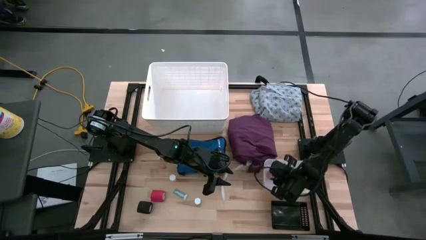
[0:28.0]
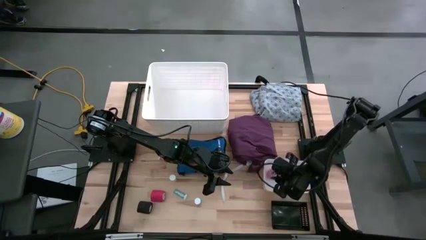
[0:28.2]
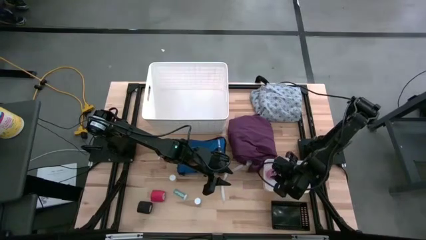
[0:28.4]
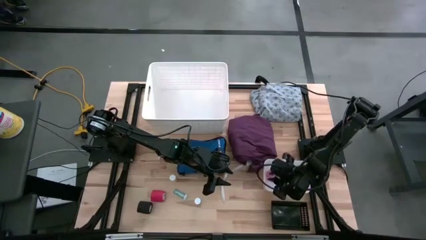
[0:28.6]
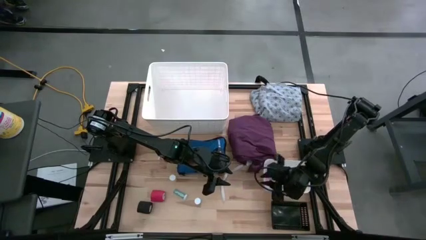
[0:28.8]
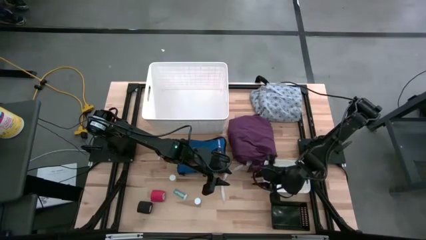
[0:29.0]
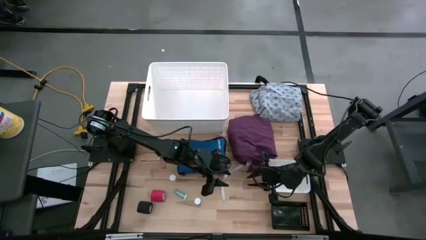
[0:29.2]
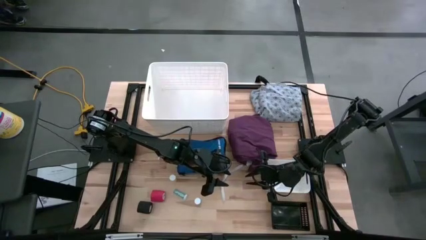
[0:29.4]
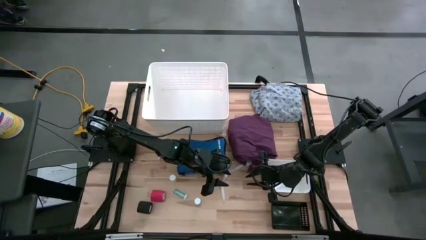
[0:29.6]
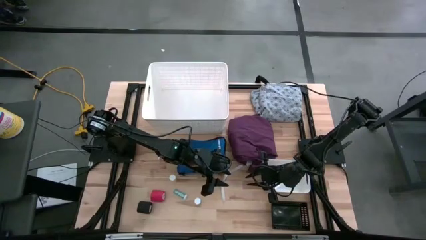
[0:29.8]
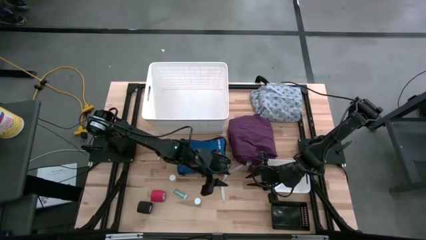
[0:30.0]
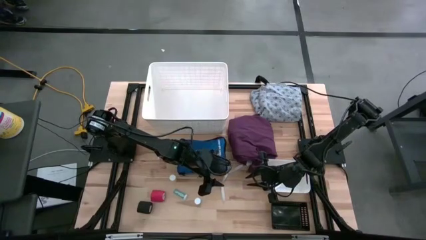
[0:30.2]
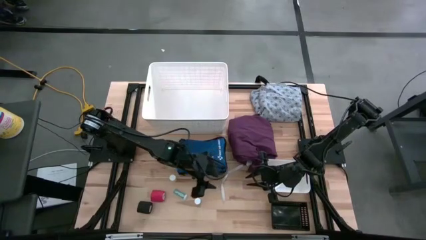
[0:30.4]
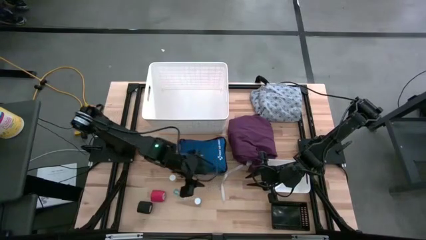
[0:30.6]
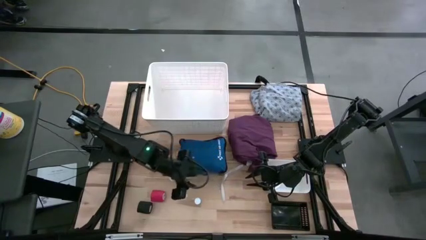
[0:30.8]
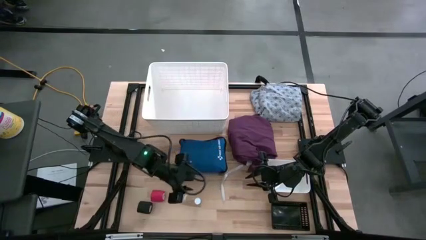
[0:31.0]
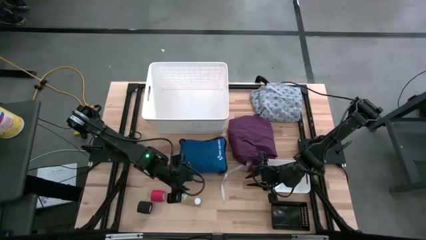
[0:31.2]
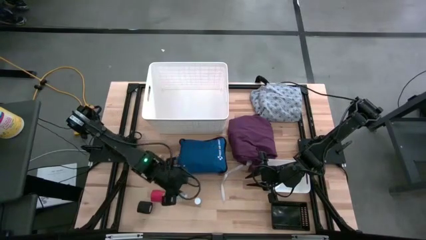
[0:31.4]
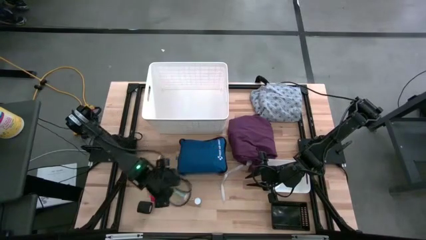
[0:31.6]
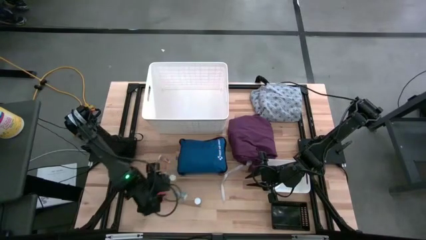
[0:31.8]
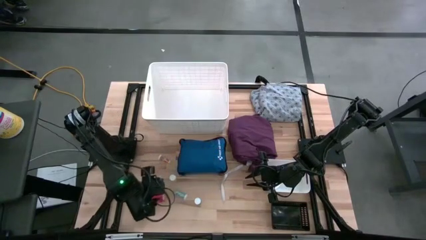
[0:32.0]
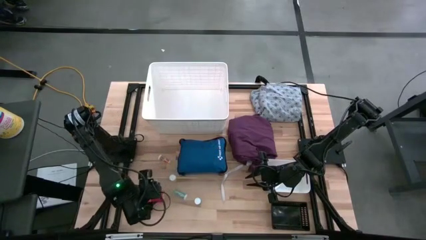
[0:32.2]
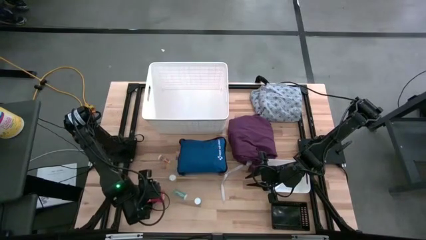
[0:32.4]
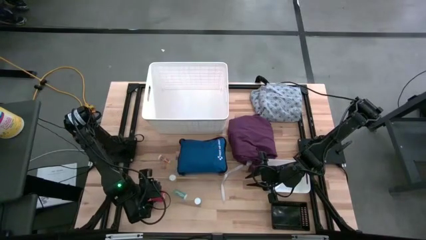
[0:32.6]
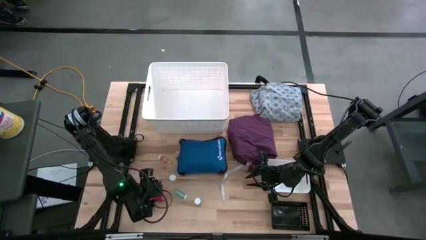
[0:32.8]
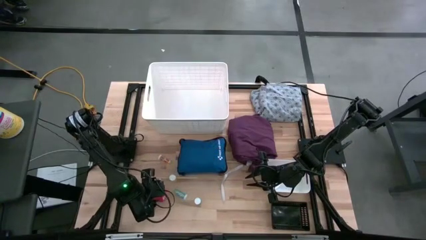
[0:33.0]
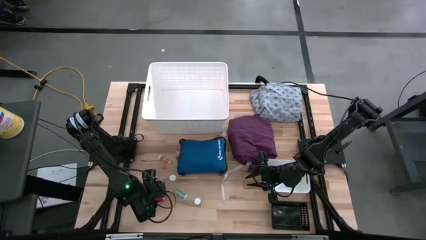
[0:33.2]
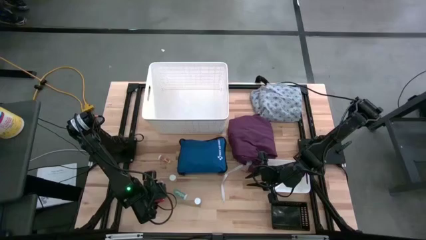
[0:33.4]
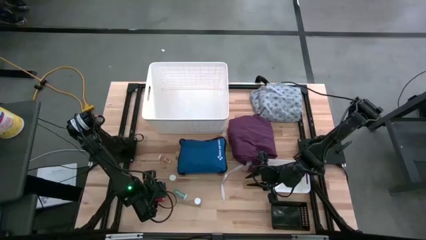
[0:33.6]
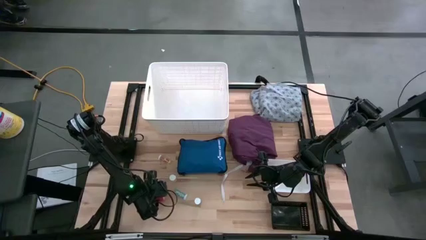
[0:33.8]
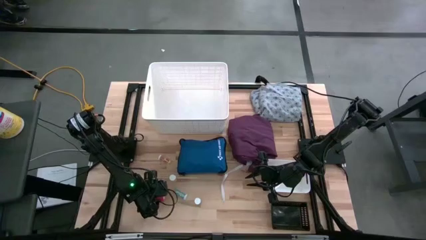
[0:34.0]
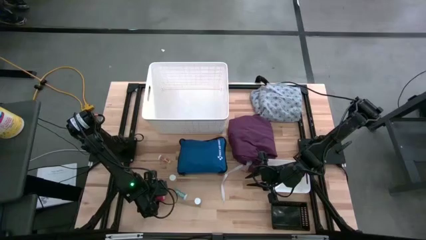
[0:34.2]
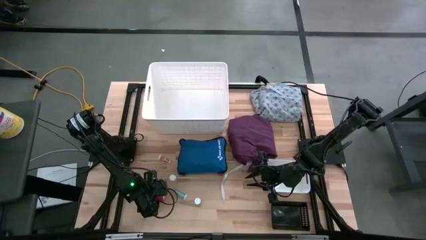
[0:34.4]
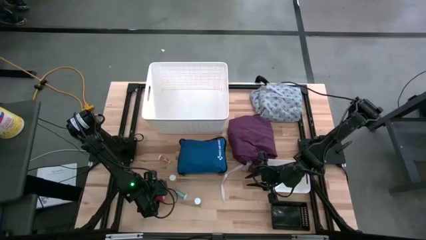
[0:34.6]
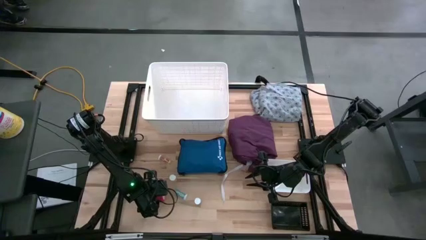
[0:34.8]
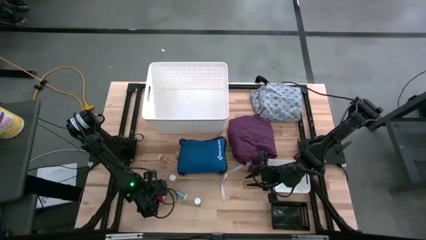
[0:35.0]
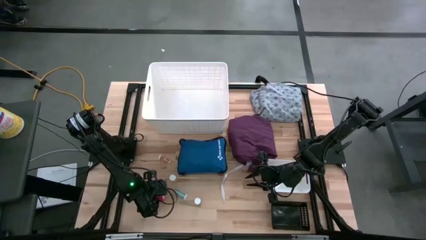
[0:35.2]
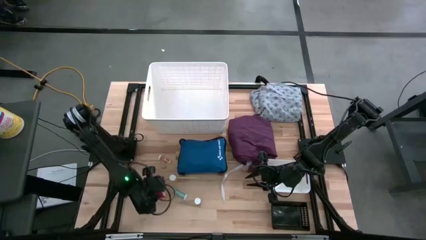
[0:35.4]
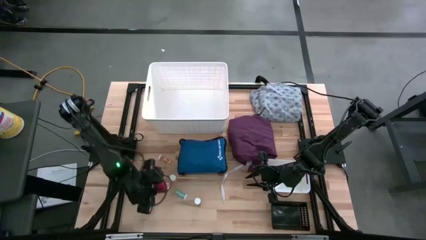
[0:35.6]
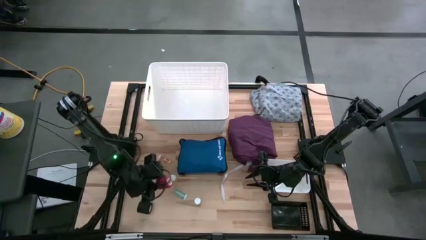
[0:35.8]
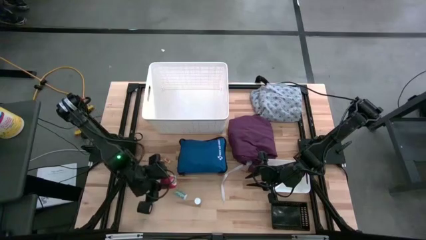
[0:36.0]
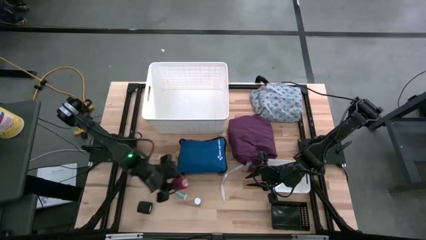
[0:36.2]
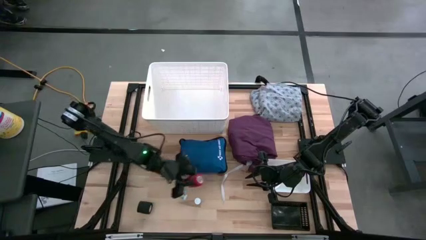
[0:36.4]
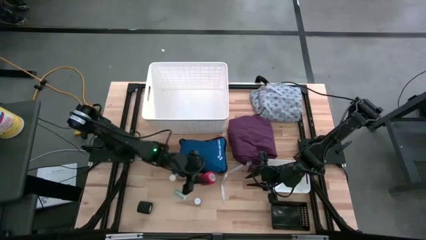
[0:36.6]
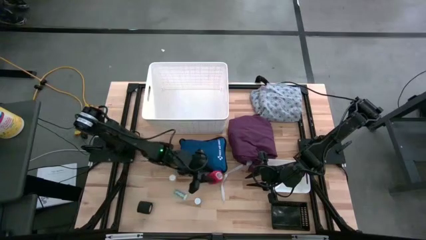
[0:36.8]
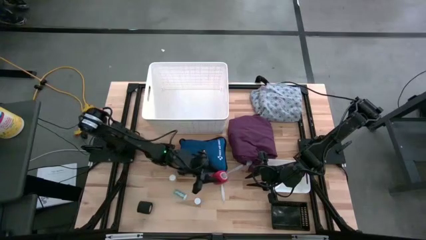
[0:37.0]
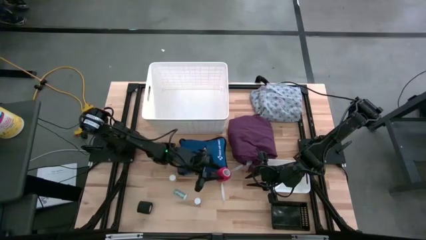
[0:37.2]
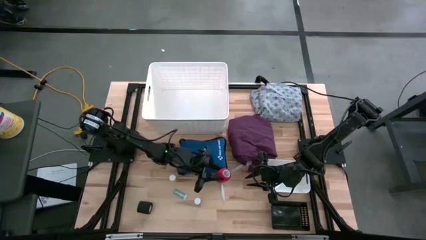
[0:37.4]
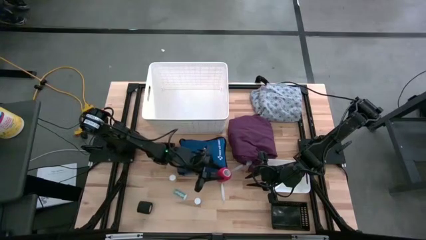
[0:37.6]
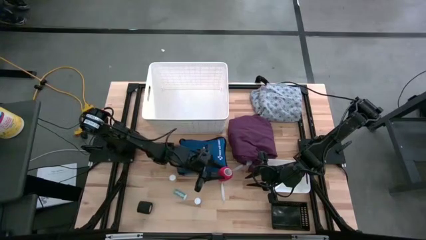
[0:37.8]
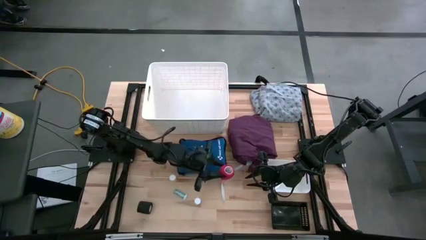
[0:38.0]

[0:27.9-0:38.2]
Task: Pick & Place Medicine items
Put the red bandage into the white bin

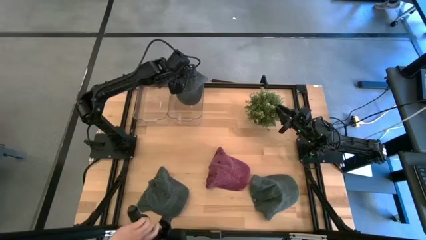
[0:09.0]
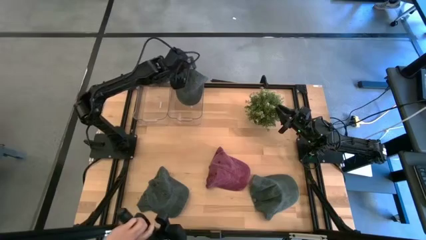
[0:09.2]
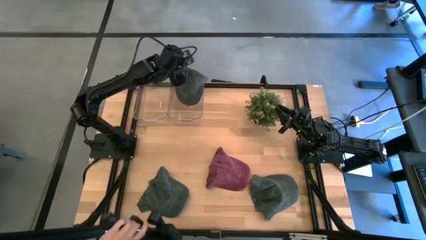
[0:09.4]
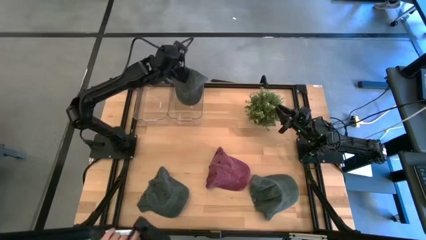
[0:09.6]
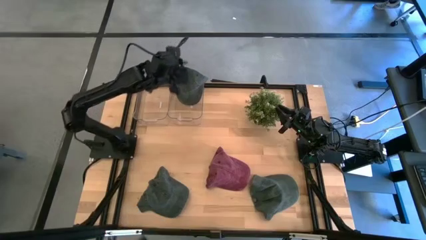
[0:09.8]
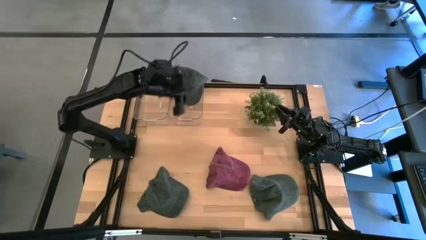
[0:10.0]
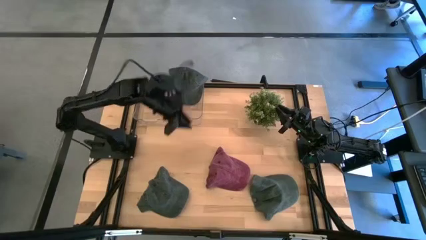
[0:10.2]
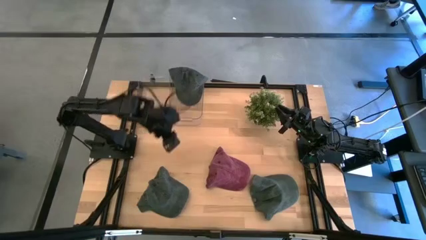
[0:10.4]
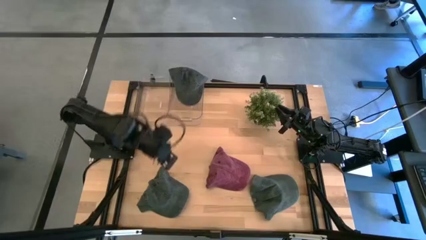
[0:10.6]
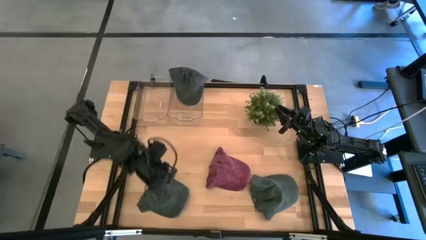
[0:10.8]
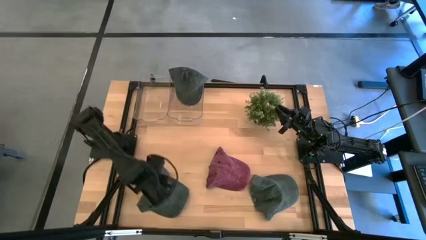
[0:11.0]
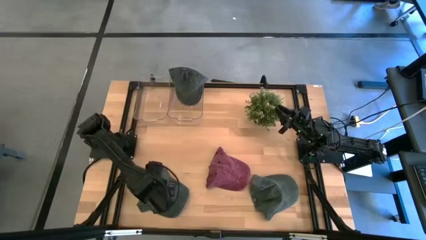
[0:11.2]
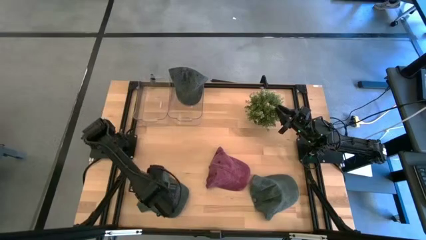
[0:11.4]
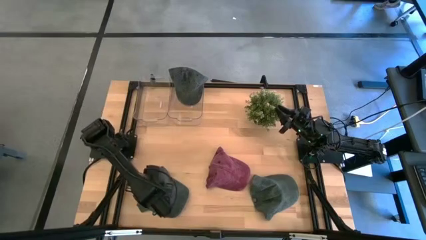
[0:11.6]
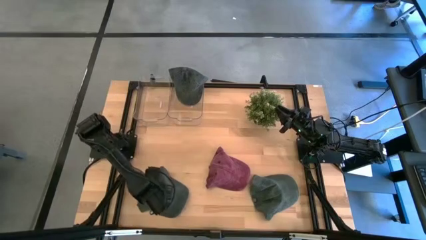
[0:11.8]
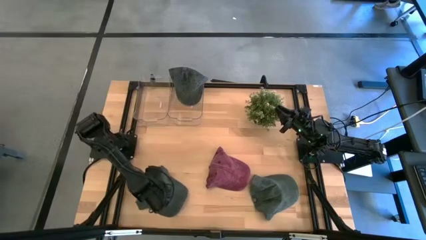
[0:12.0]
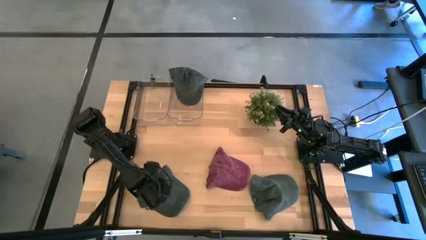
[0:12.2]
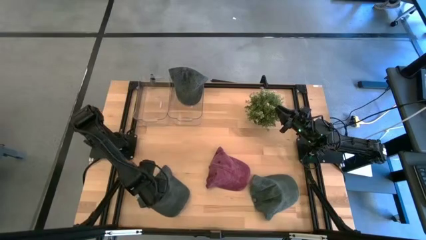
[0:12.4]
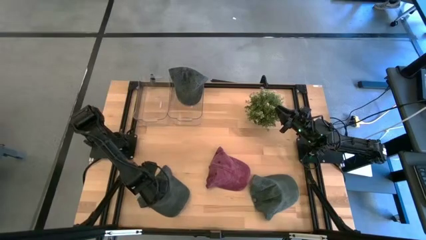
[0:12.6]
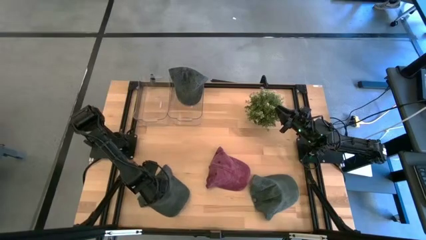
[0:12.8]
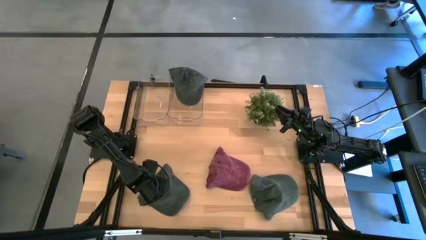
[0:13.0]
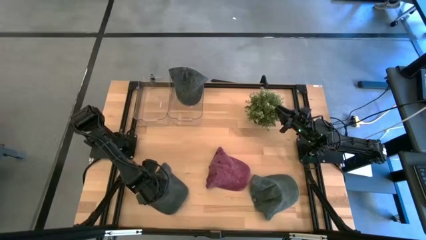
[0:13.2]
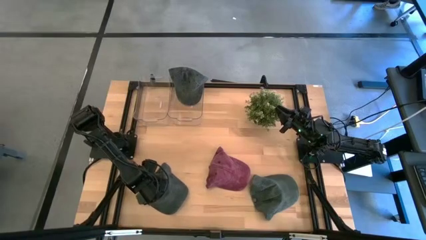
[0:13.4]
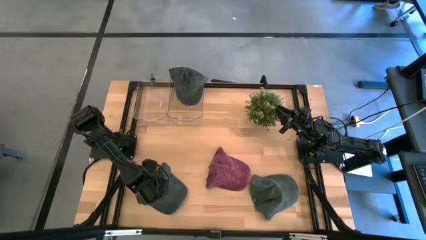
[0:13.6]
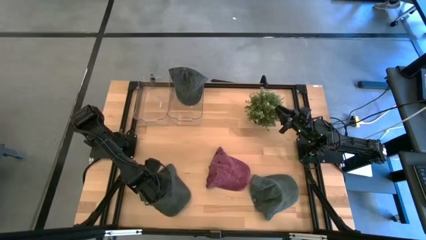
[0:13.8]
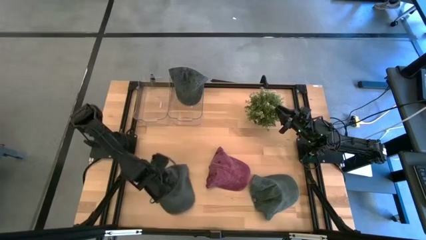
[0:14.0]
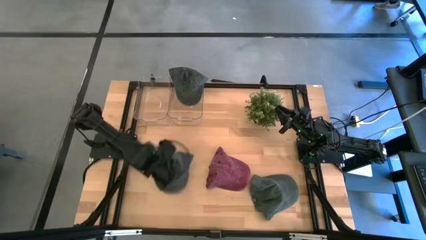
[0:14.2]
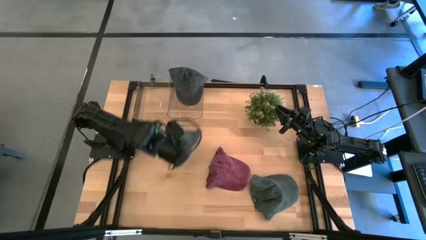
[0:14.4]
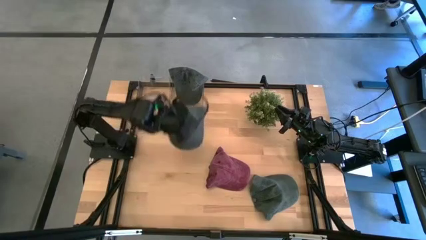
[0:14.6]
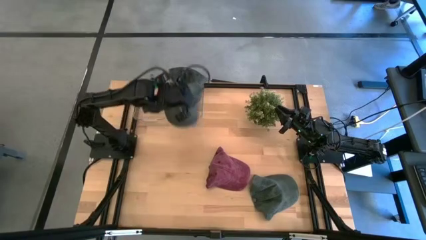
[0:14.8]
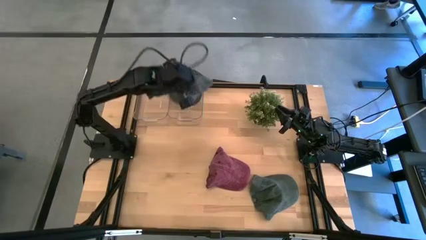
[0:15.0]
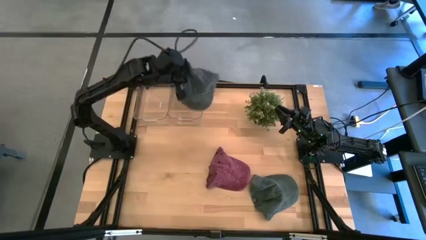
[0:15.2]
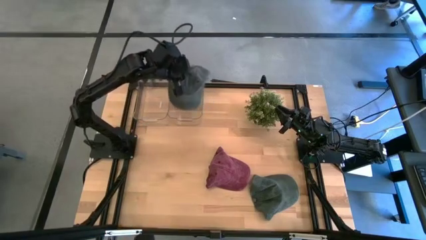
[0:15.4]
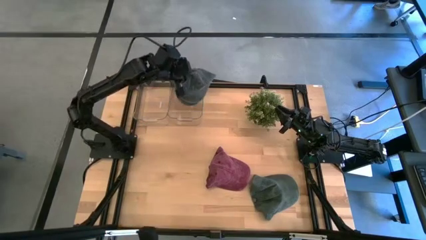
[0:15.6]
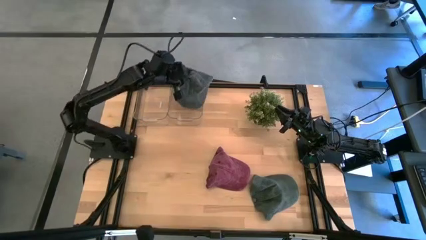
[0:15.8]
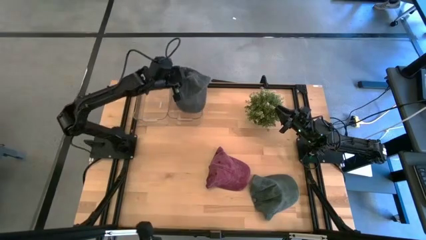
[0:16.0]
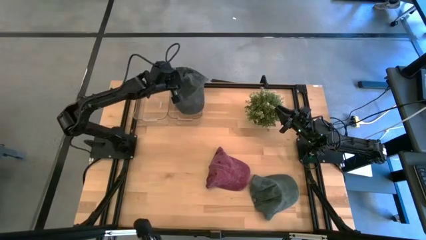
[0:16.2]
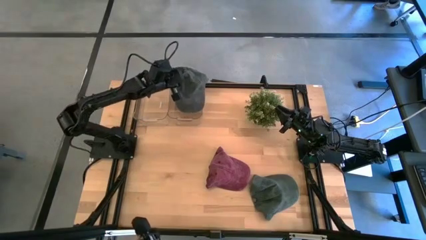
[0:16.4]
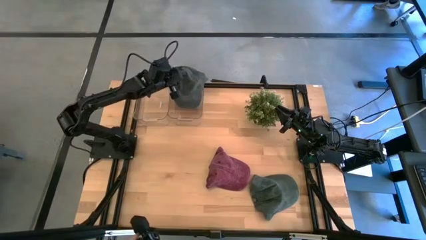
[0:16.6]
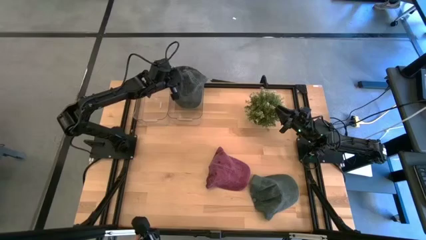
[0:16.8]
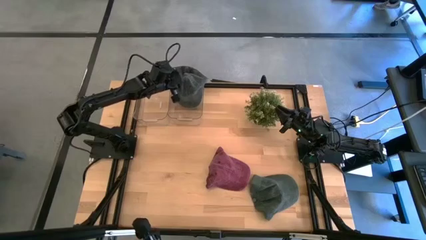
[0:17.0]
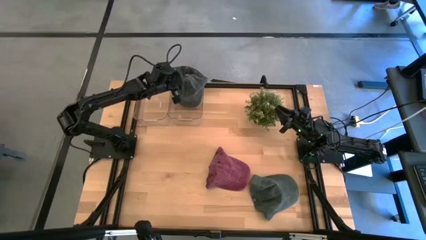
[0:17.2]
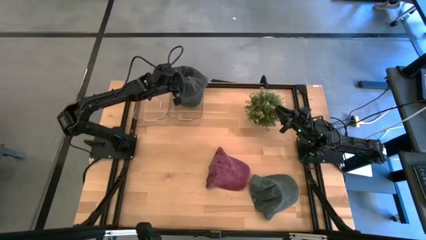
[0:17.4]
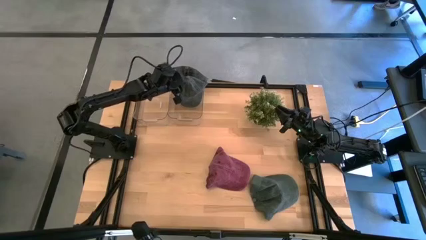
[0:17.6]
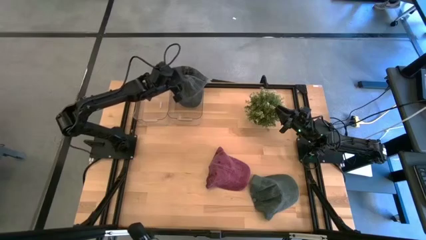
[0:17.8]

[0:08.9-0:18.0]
Task: Pick & Place hat
Put the left black cap into the right transparent bin
